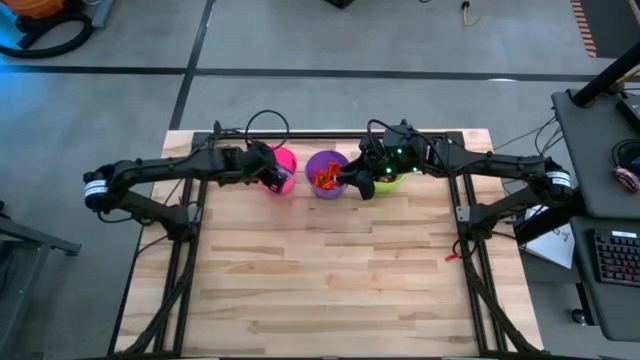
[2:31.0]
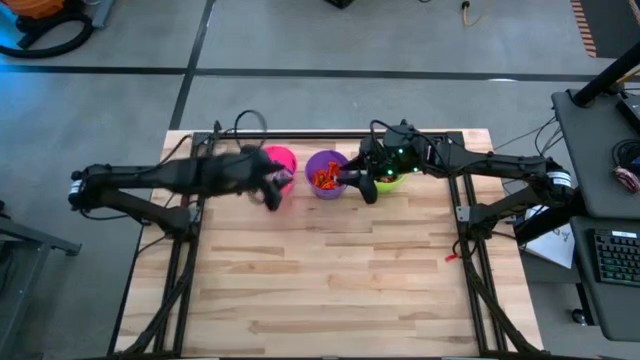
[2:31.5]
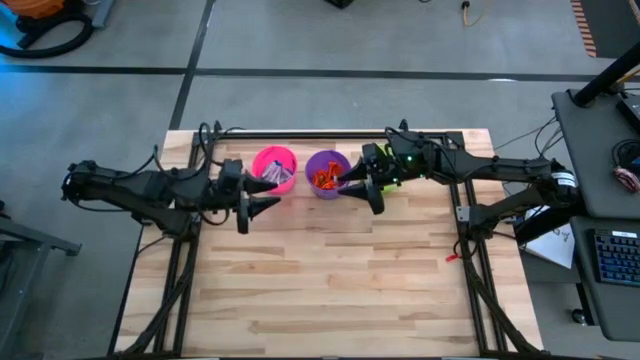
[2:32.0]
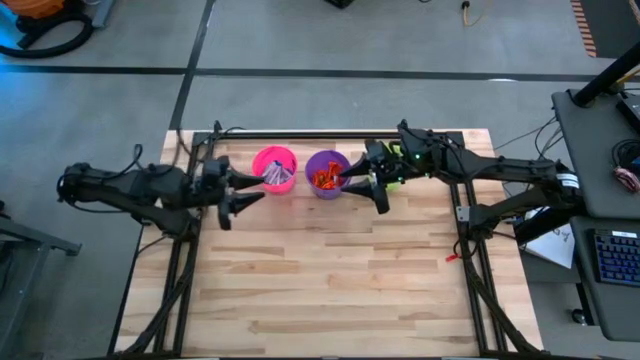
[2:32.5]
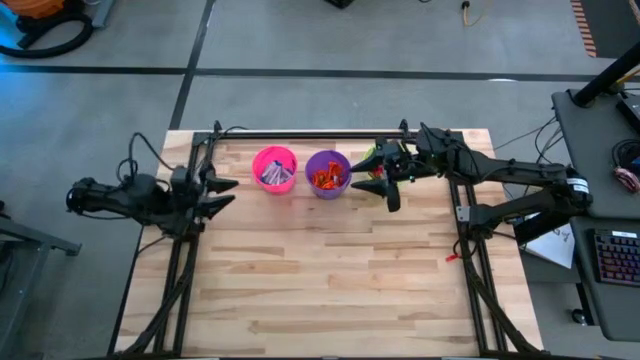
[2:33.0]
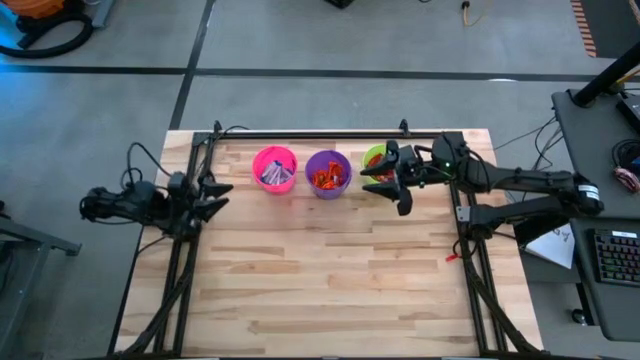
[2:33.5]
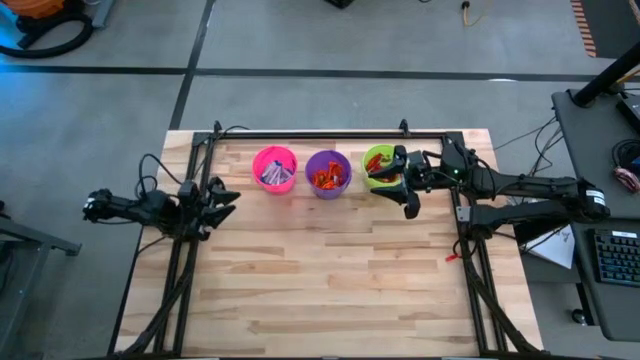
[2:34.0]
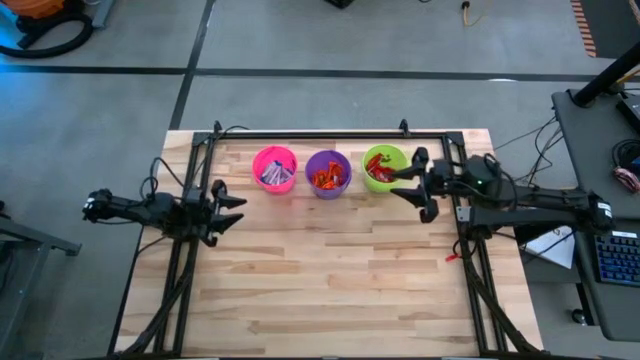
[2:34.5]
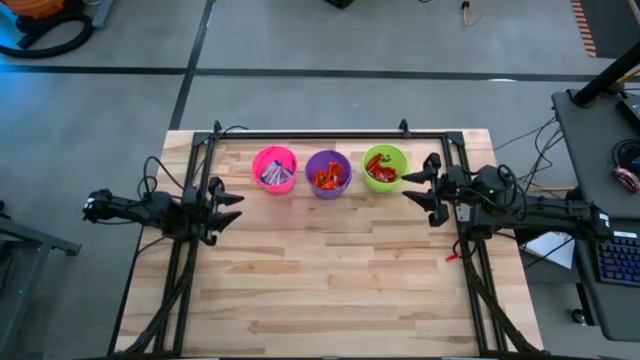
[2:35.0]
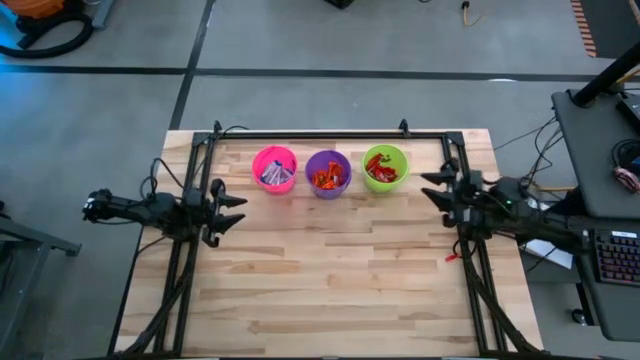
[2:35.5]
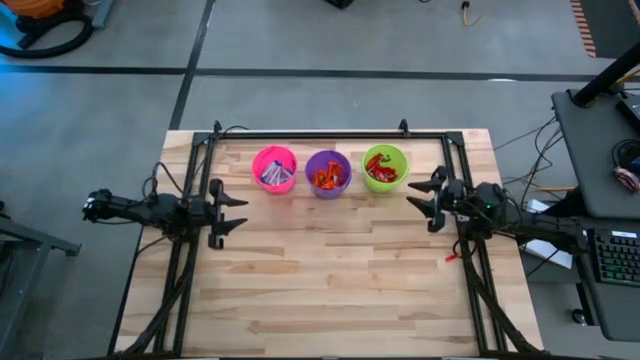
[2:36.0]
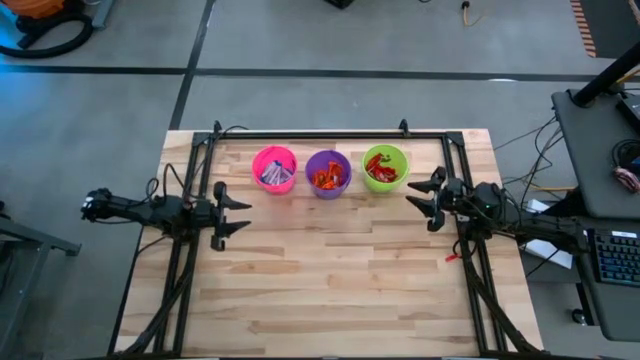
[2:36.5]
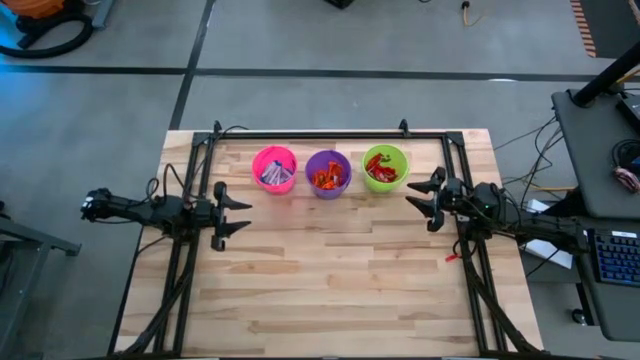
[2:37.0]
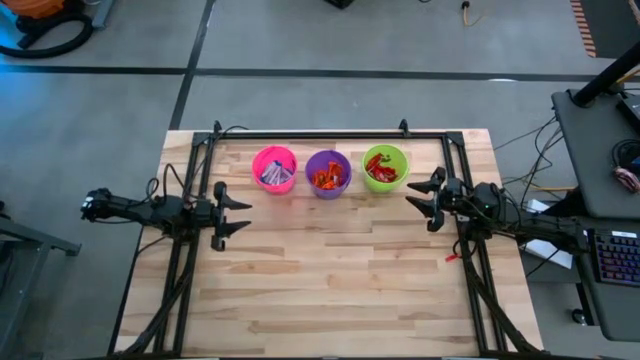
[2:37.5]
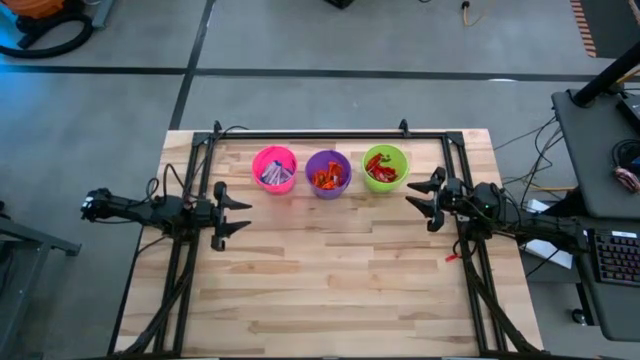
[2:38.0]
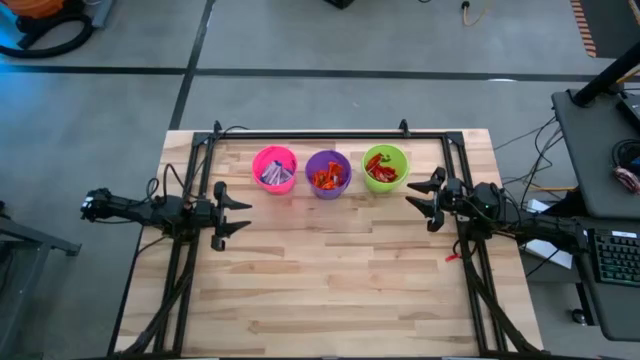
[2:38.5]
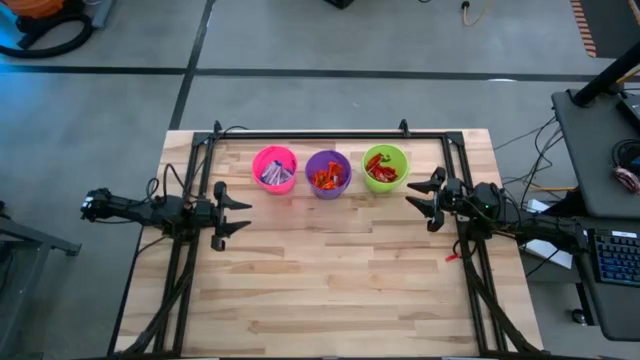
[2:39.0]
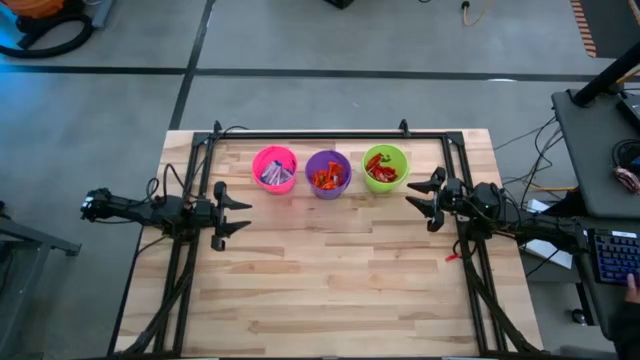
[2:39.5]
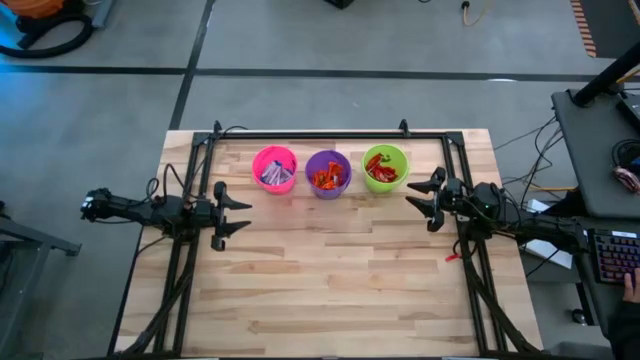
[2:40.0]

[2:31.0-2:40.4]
Task: Organize candy in baskets
Return to Home Position

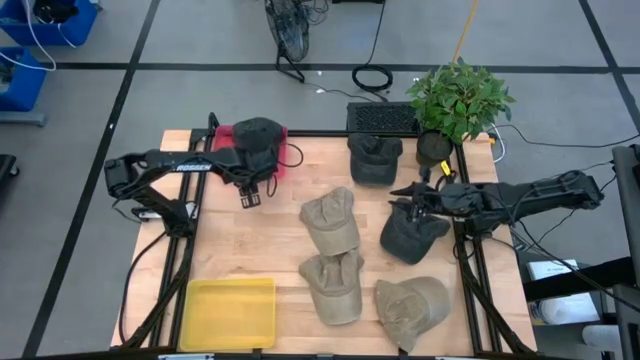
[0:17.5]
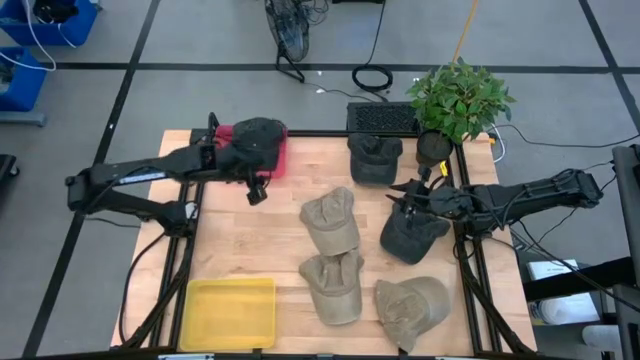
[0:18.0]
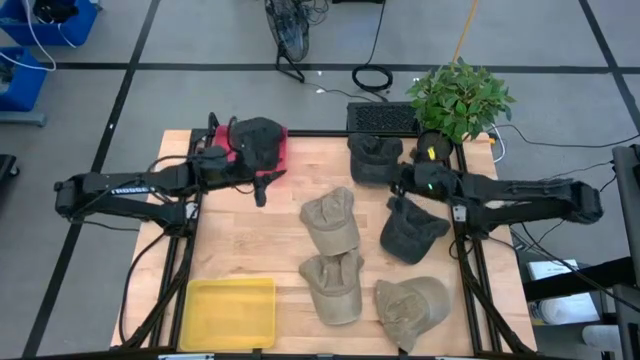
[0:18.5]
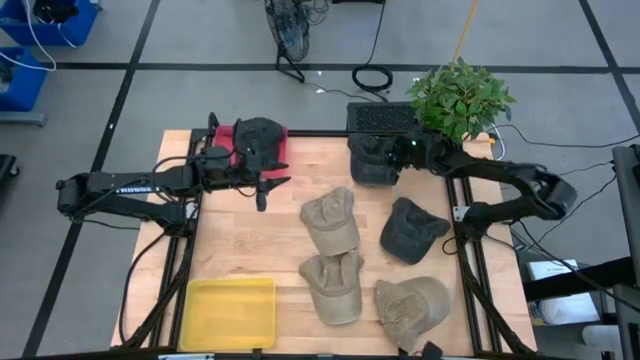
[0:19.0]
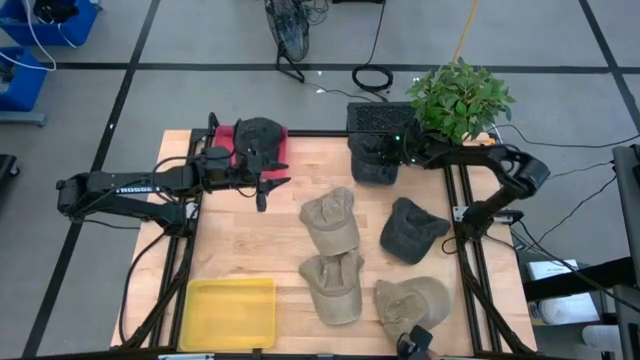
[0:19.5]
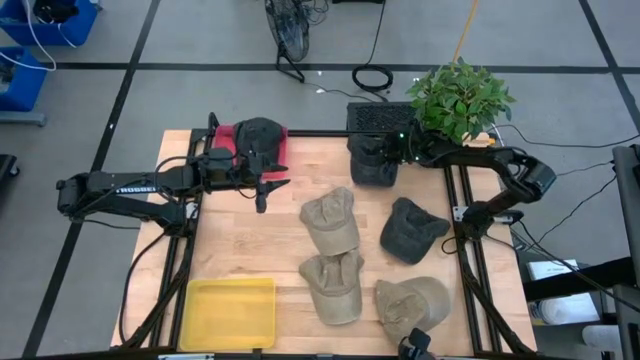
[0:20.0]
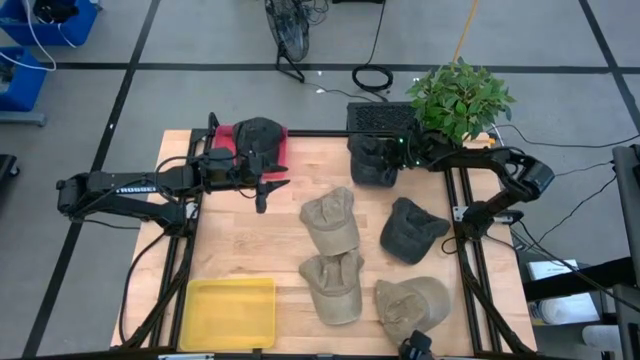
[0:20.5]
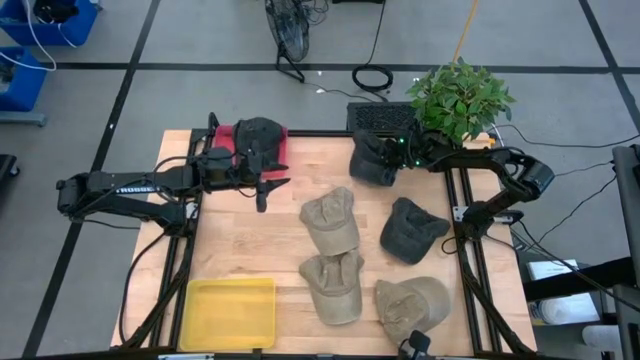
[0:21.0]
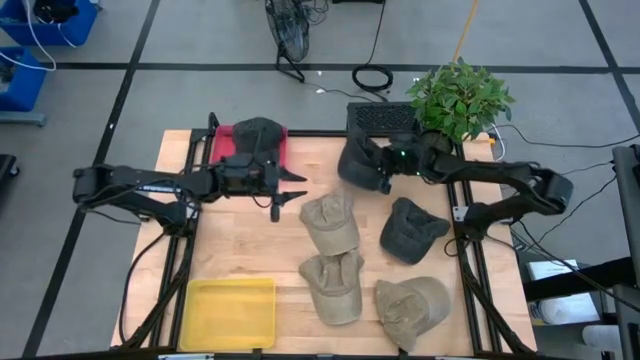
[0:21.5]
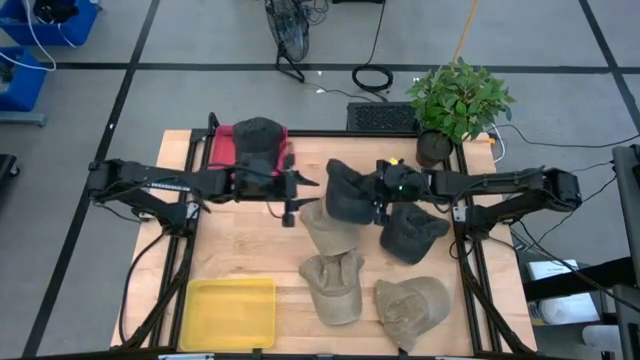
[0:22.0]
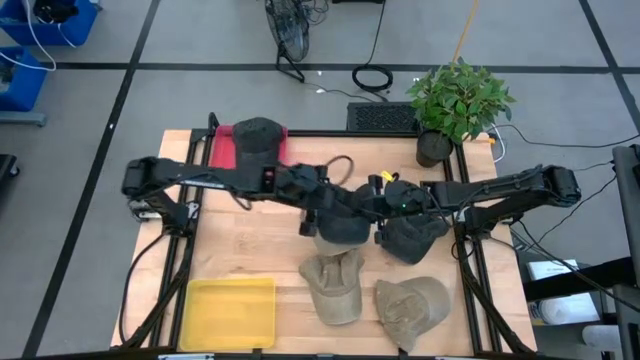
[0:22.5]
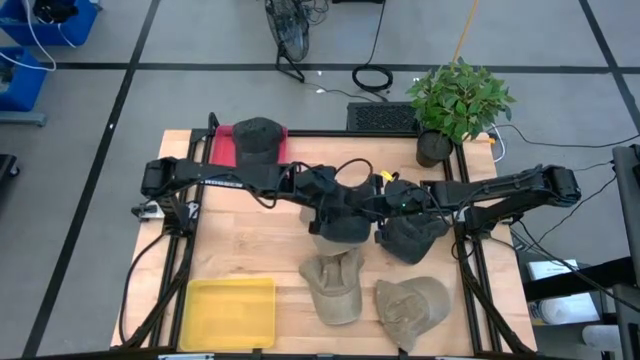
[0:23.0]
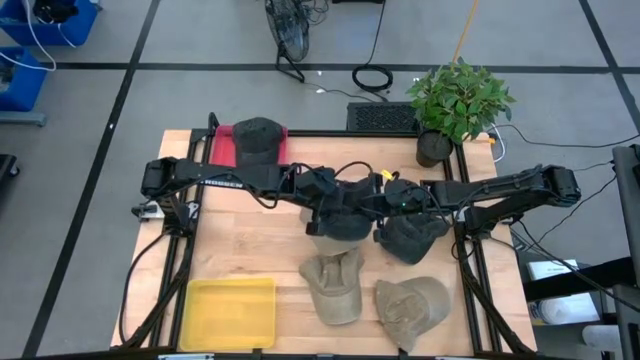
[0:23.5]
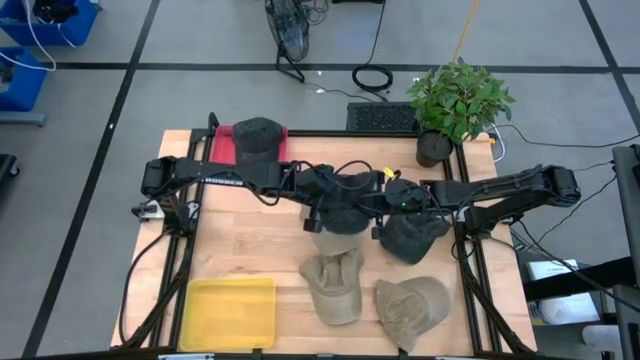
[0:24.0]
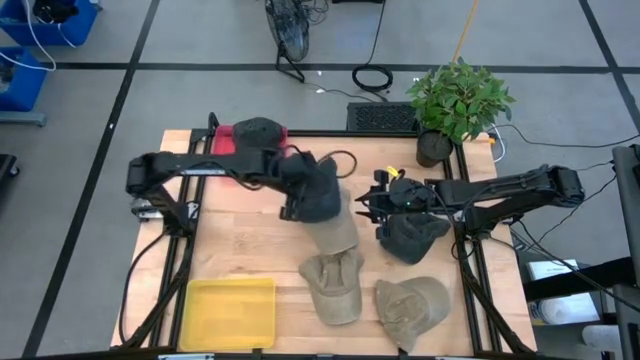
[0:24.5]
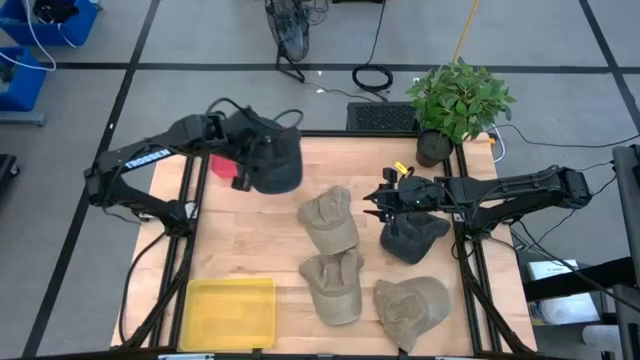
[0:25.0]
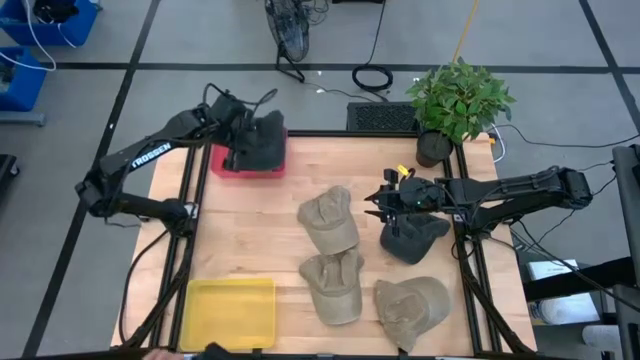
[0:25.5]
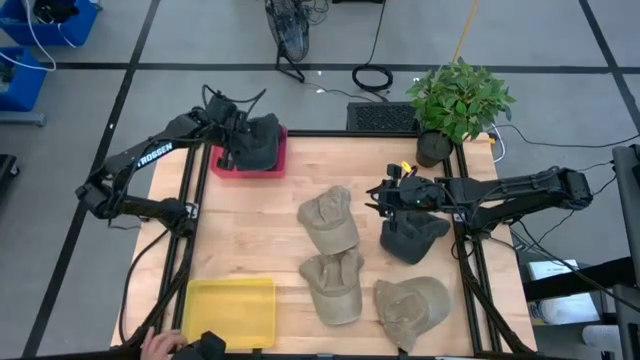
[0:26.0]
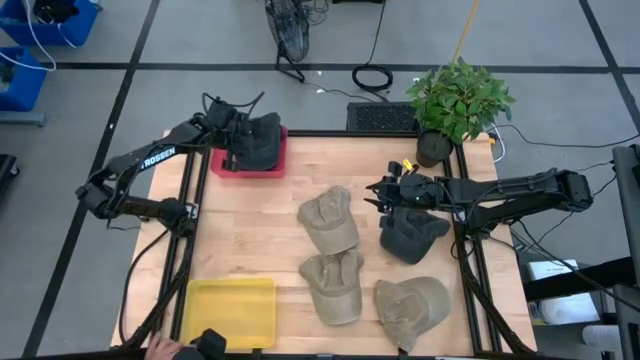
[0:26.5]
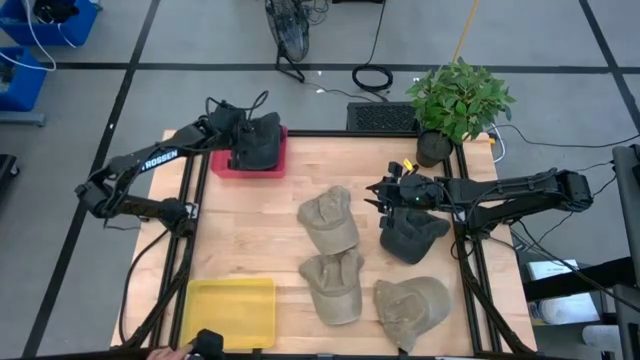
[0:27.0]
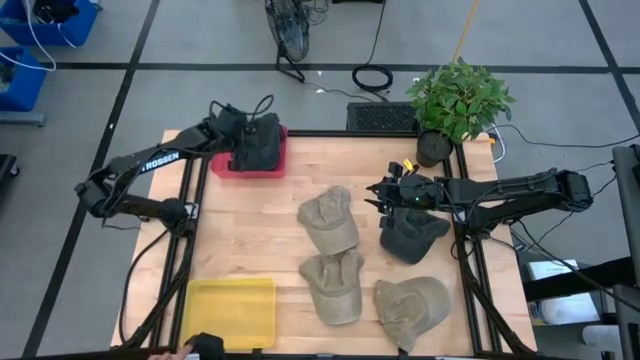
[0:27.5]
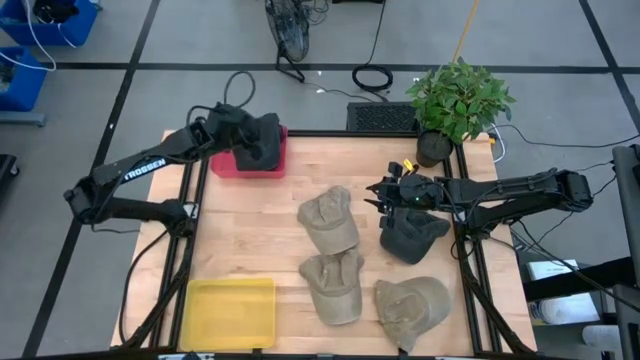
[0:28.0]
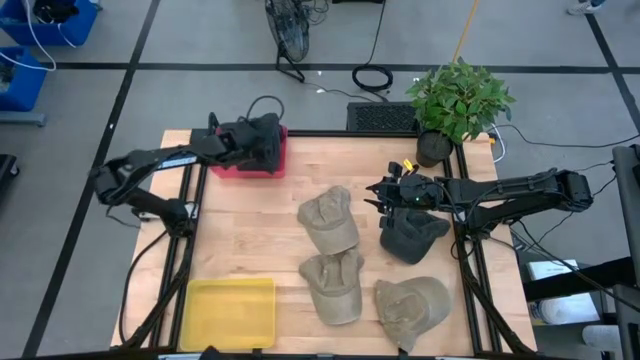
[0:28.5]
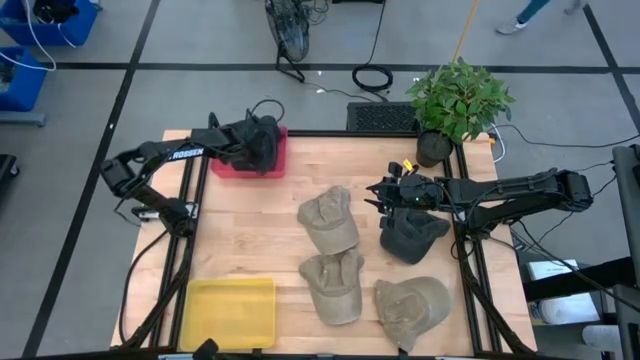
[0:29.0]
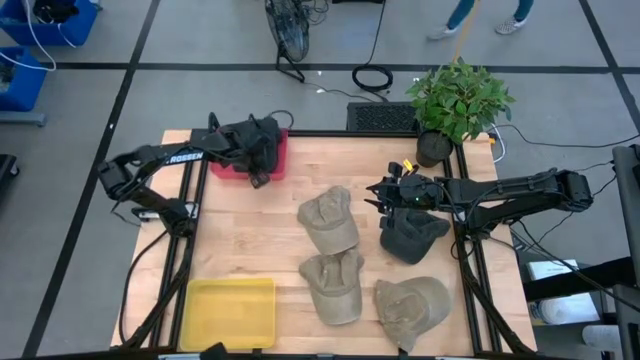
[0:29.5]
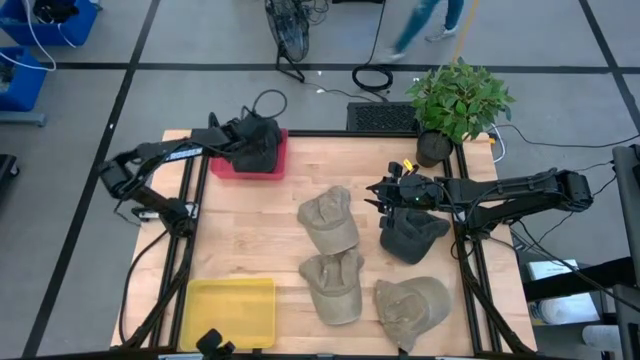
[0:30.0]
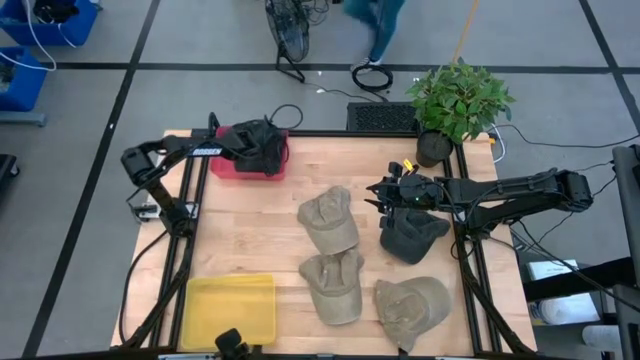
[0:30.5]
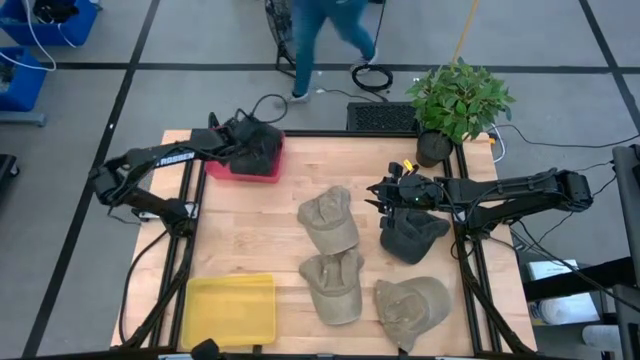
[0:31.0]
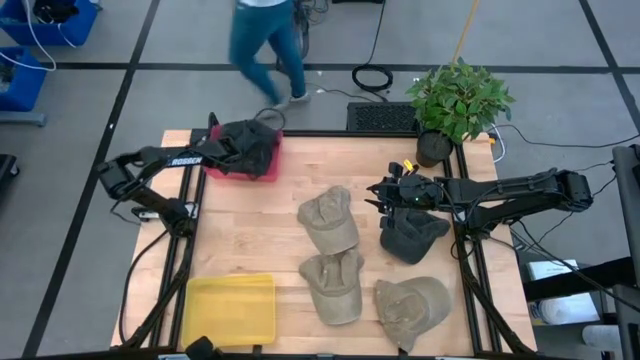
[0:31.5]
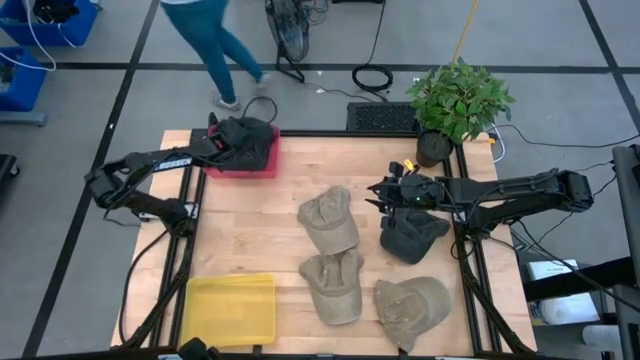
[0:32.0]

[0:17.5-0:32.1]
Task: Pick & Place hat
Put the top black cap into the red bin
